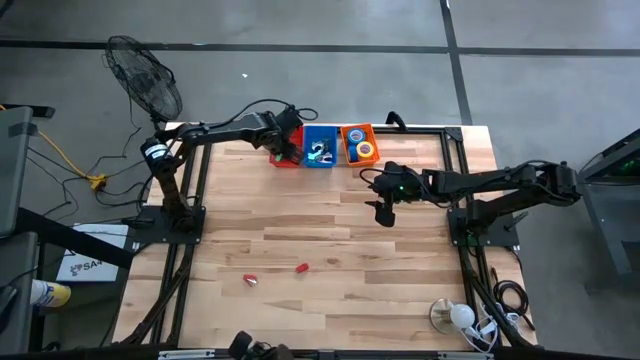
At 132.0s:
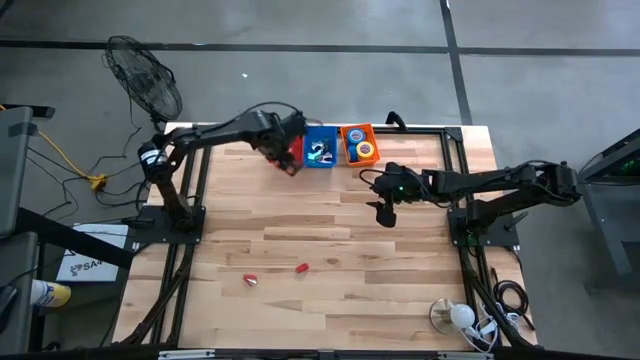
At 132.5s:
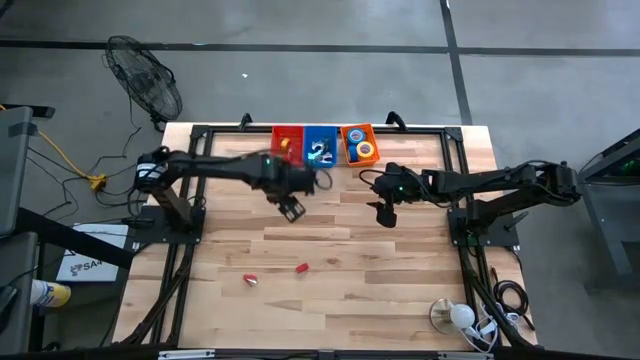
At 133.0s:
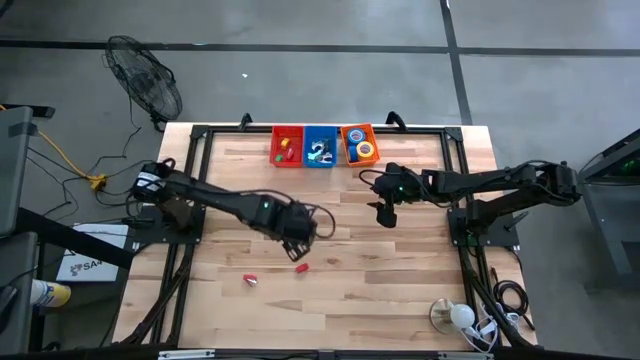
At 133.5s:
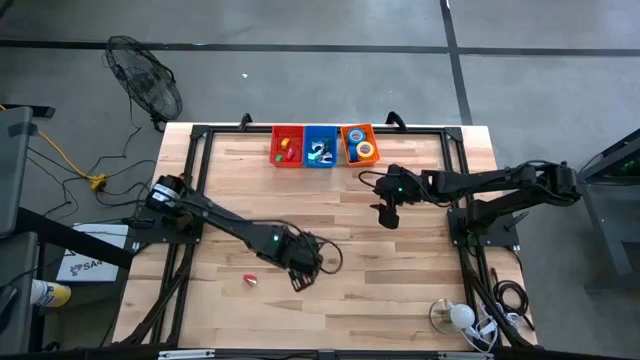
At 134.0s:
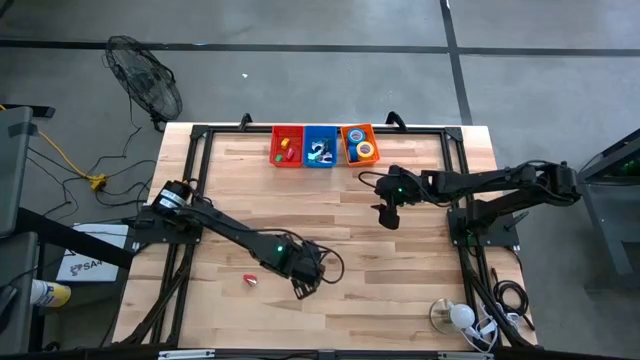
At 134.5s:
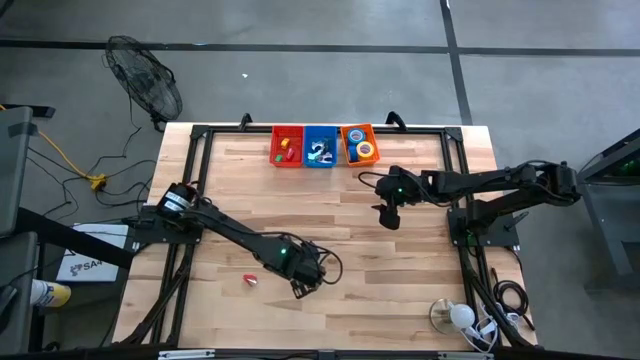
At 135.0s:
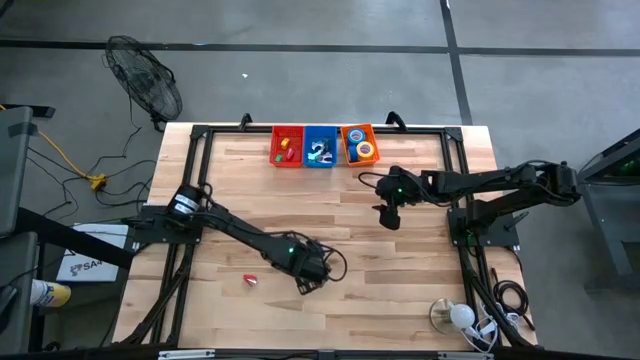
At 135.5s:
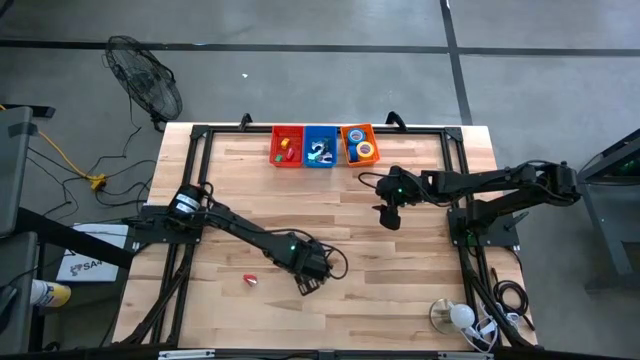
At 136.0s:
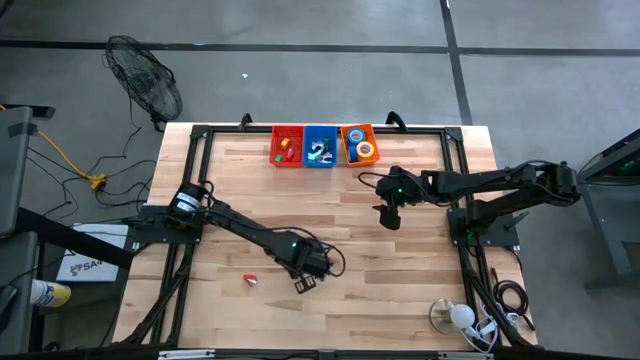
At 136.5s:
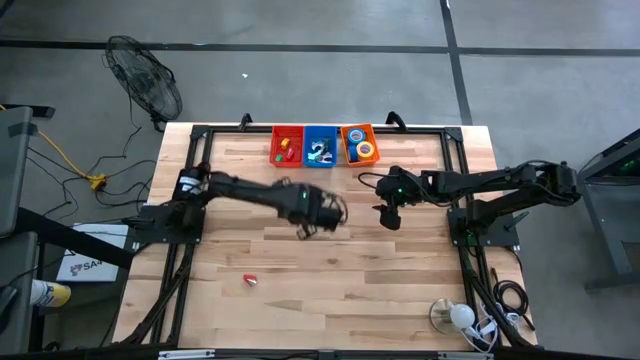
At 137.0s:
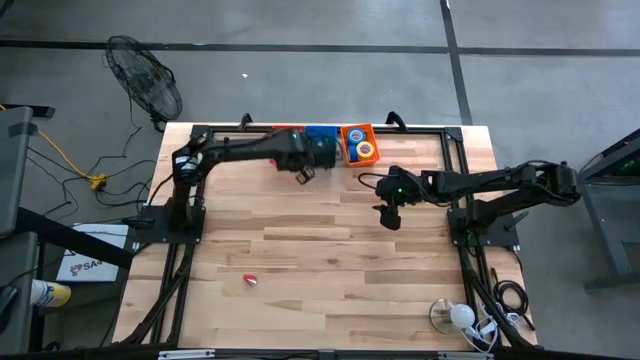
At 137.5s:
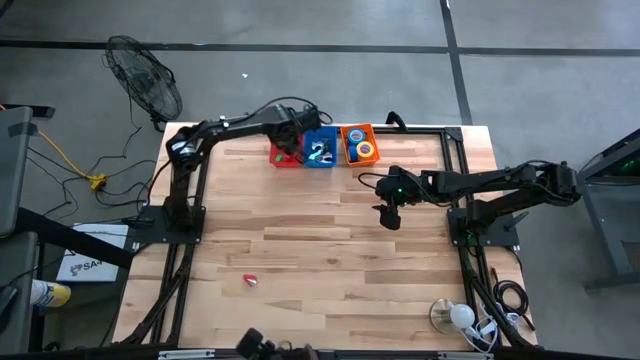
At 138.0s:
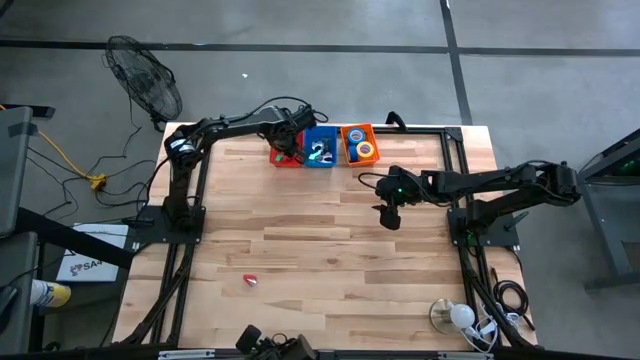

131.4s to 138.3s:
Task: Pick and place Stapler, Stapler remover, tape
Put the top red stapler into the red bin

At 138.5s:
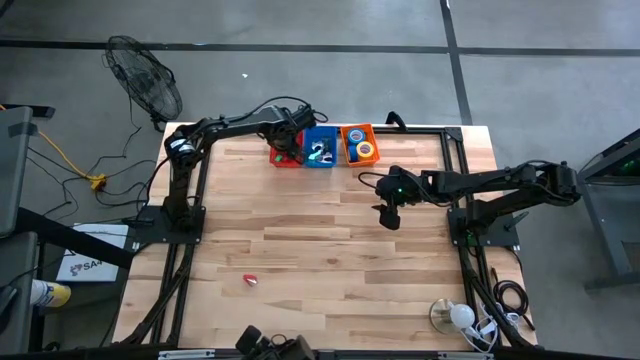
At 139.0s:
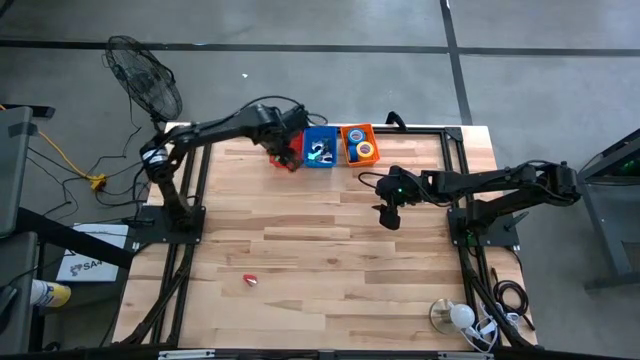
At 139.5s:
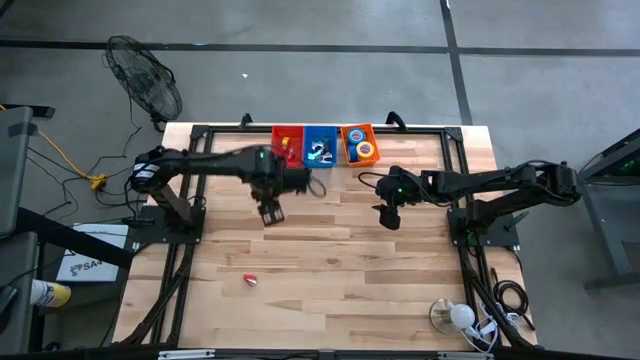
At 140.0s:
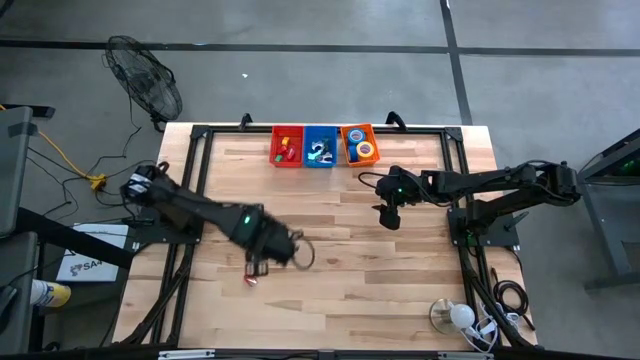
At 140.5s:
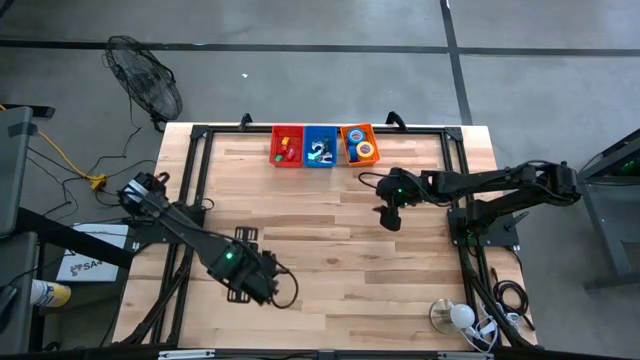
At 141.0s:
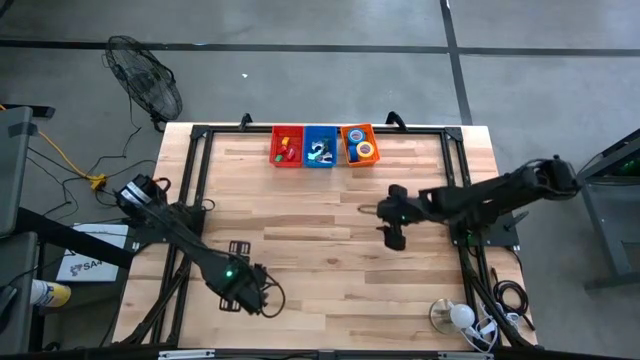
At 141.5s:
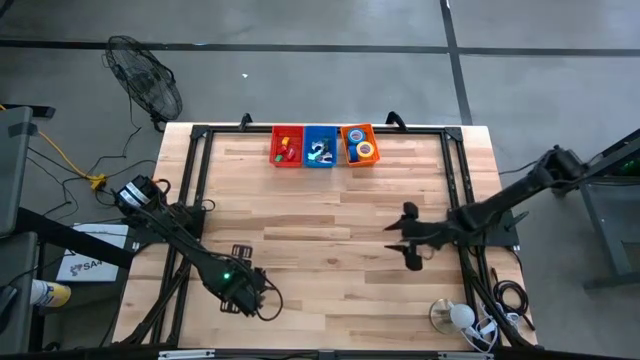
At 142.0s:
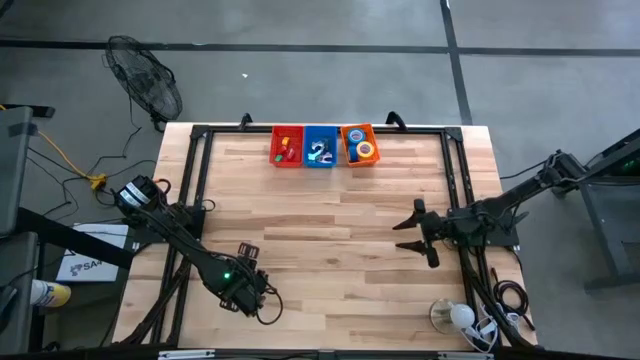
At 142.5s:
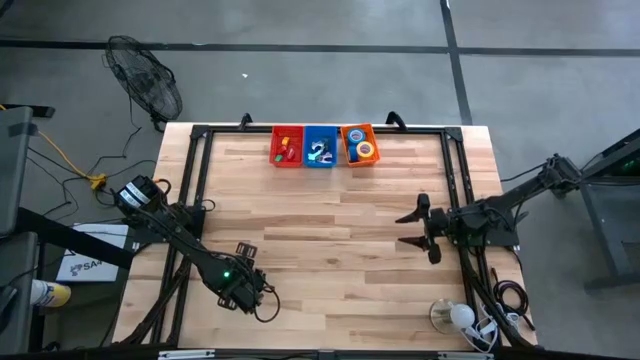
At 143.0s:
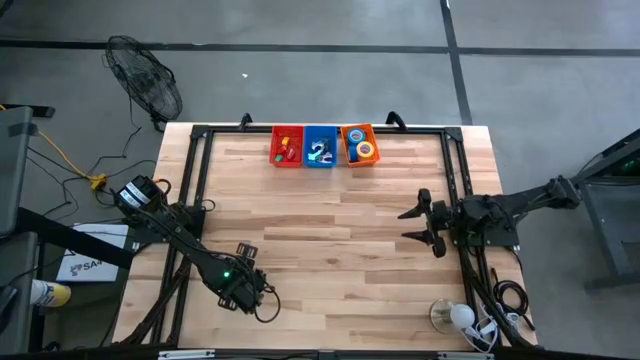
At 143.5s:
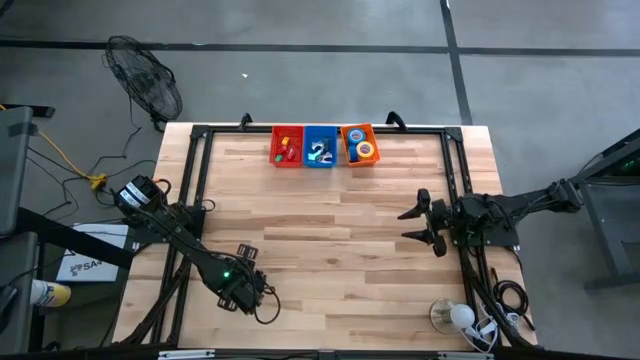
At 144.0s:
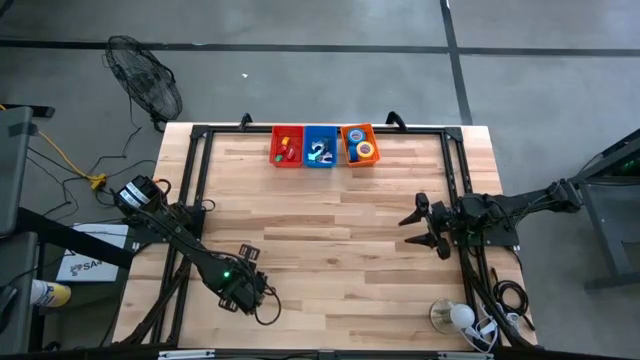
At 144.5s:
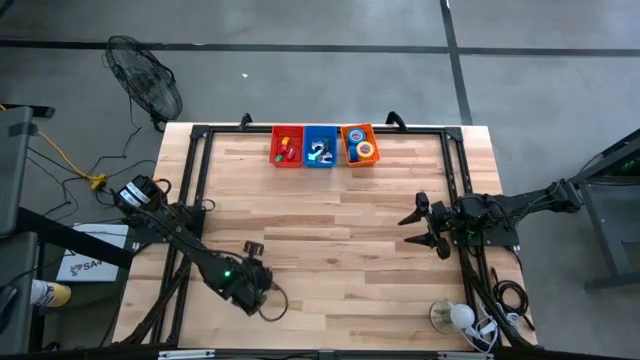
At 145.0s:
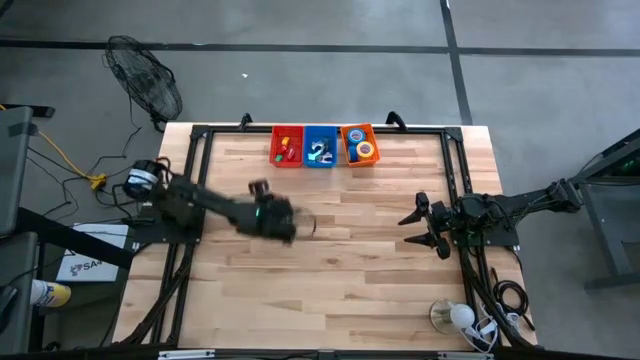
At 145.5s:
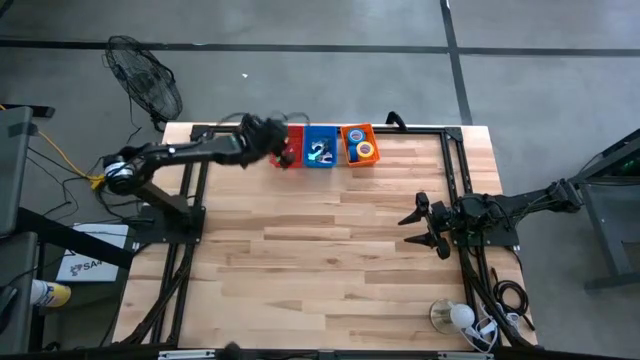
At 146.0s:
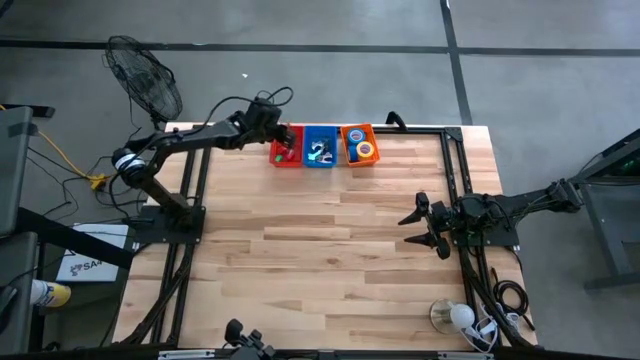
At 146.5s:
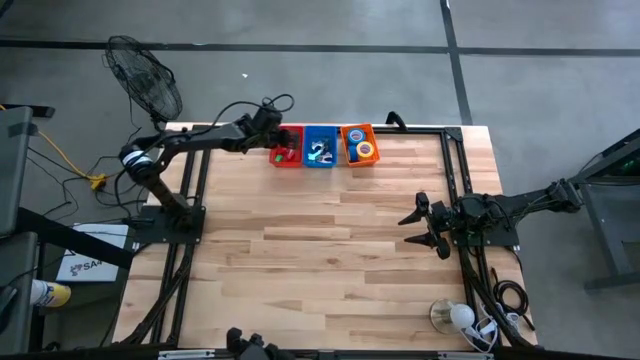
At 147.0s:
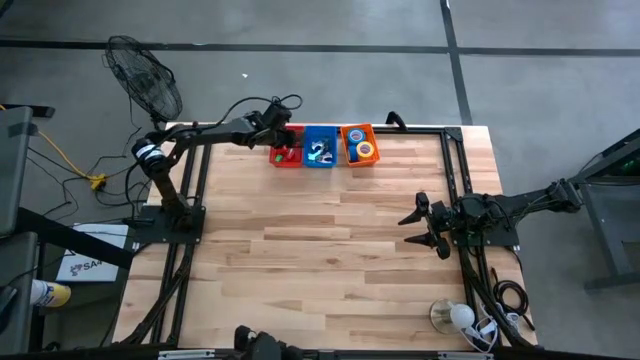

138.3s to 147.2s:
Put the red stapler into the red bin

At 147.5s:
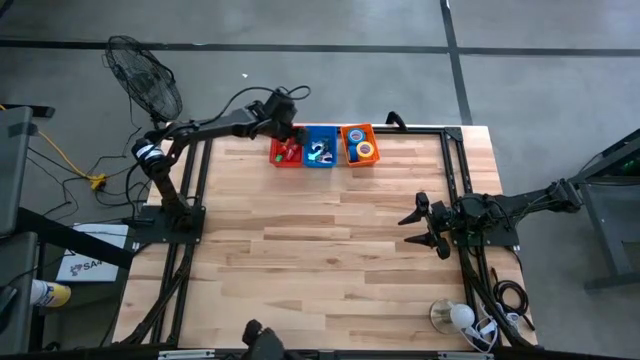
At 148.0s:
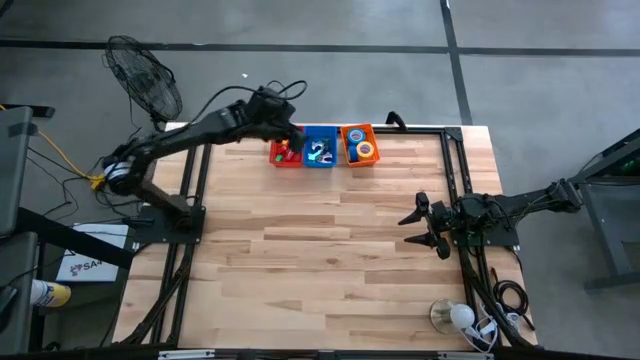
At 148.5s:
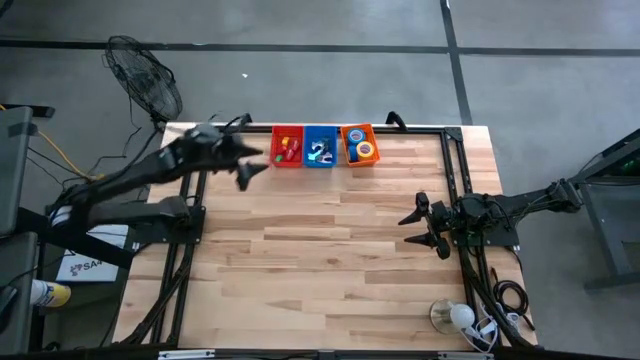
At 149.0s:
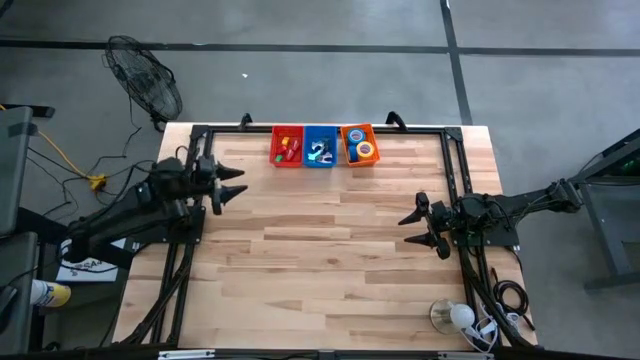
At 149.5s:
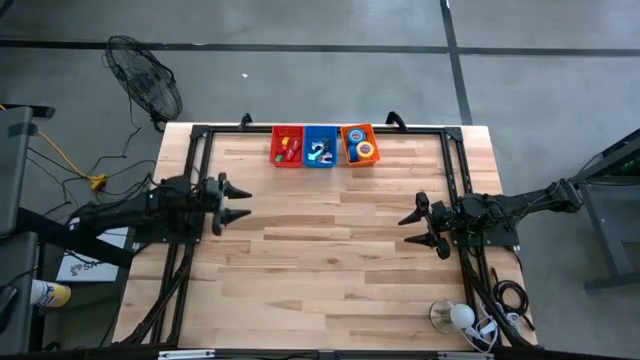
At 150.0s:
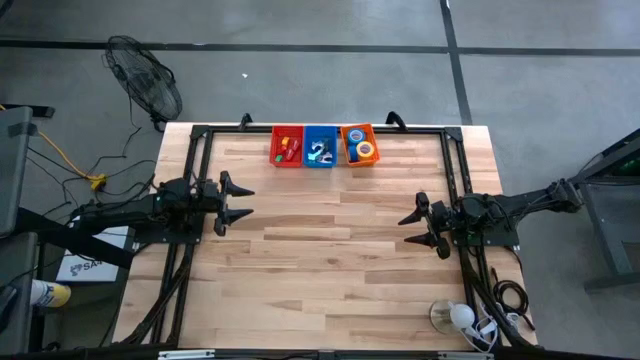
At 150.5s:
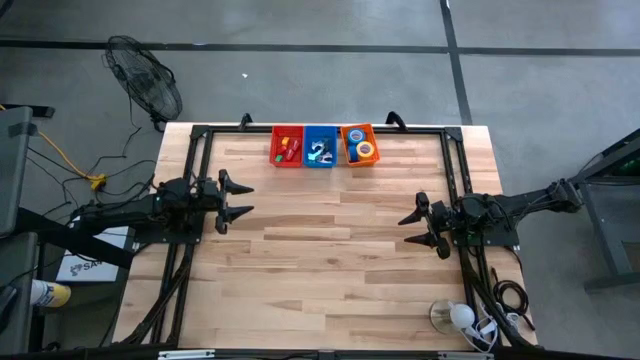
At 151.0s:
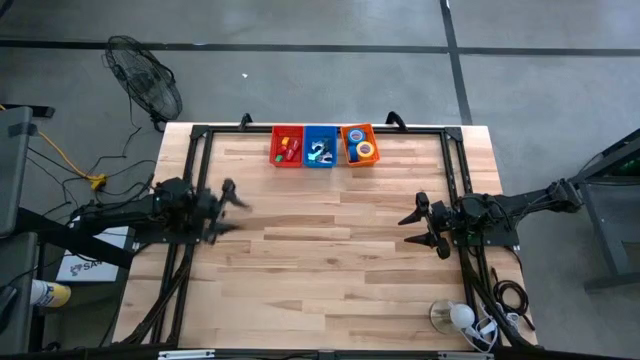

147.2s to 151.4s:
Return to Home Position

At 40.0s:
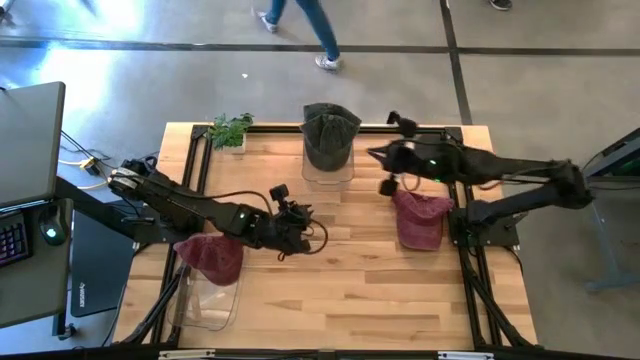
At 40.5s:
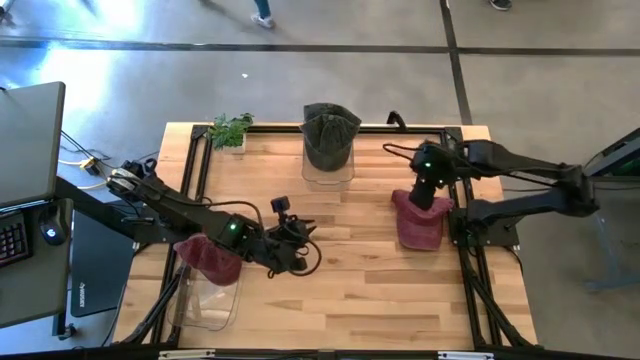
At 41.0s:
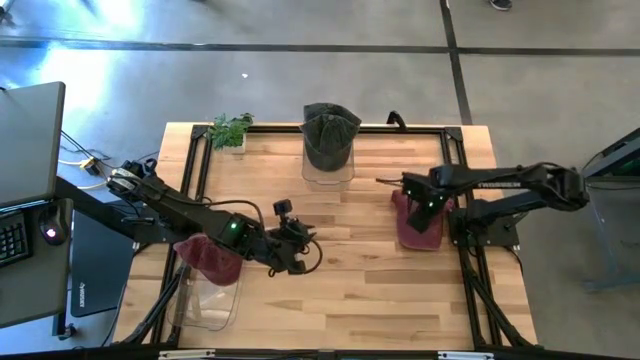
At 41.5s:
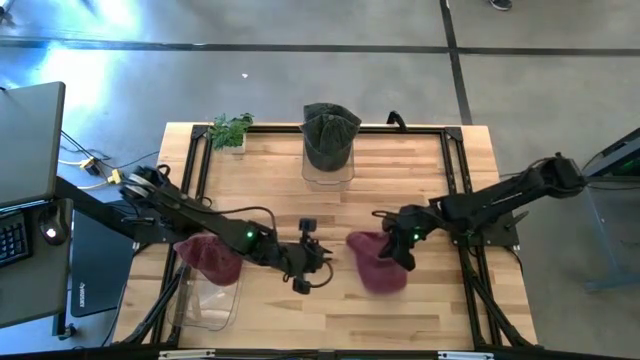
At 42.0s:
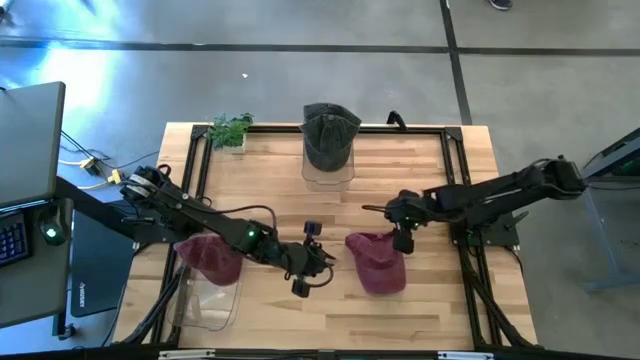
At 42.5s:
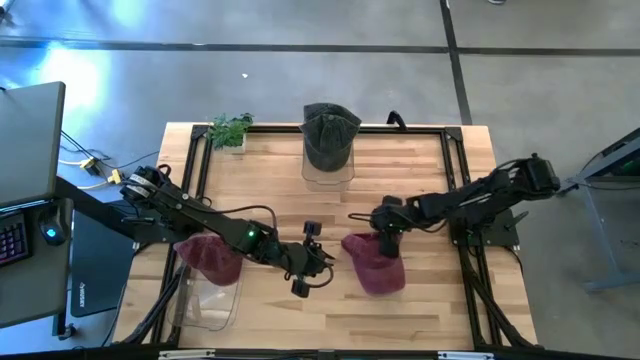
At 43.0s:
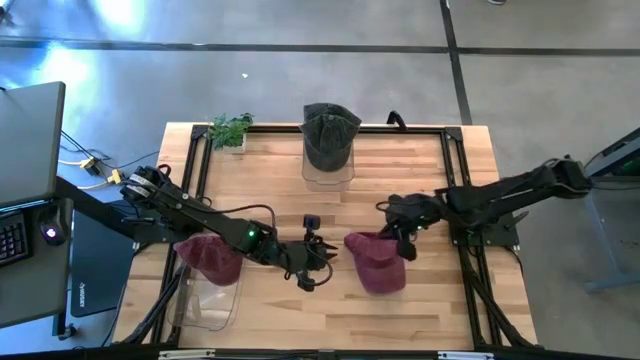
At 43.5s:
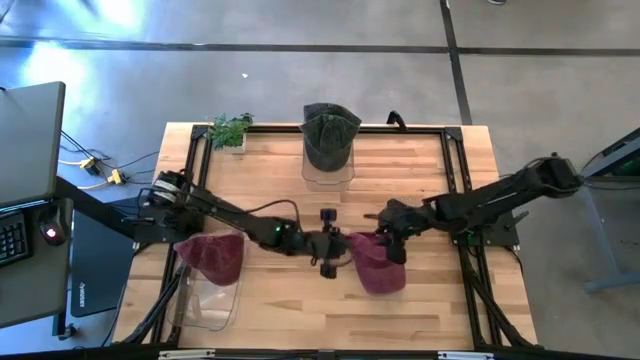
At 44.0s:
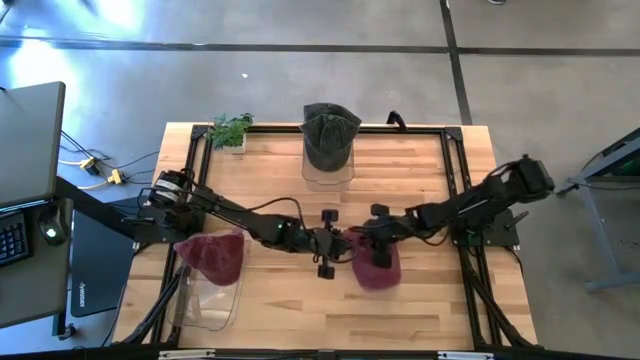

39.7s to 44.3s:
Task: Pick & Place hat
Put the red cap into the bottom transparent bin
